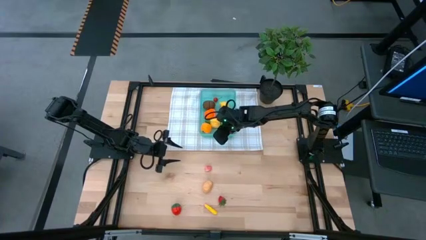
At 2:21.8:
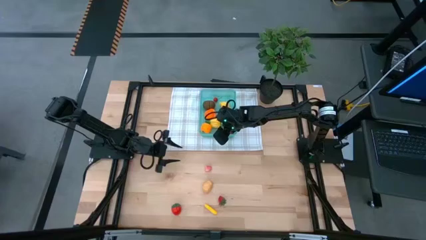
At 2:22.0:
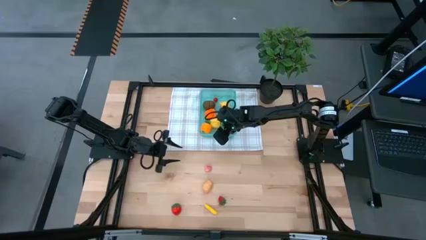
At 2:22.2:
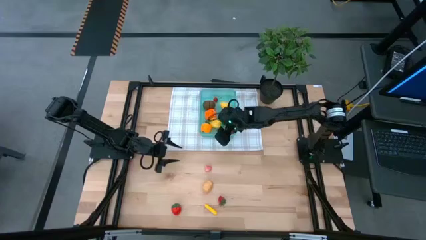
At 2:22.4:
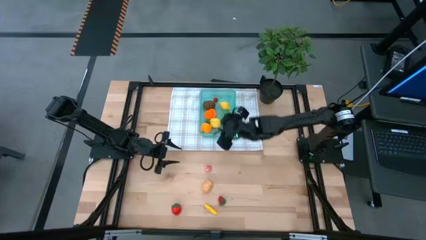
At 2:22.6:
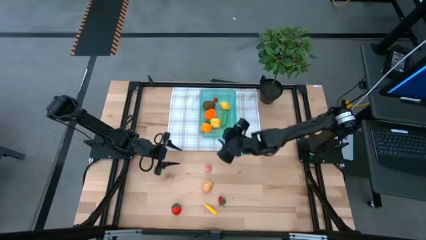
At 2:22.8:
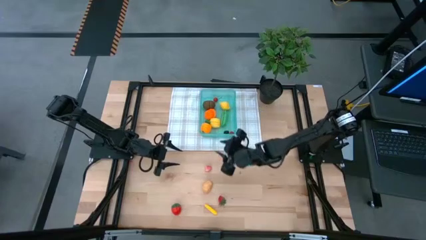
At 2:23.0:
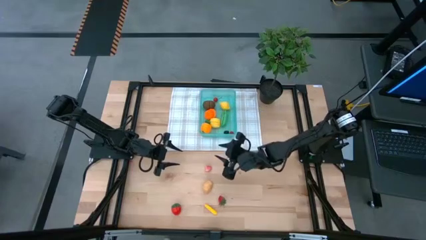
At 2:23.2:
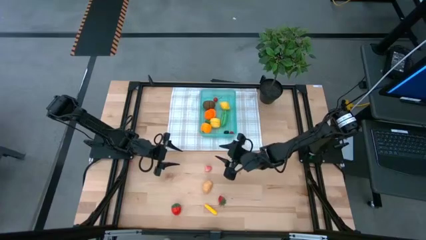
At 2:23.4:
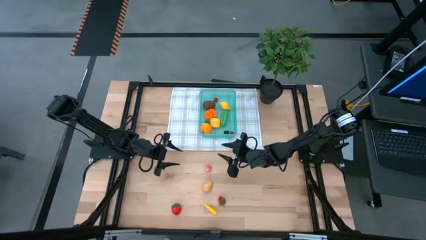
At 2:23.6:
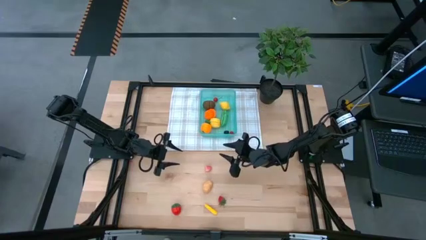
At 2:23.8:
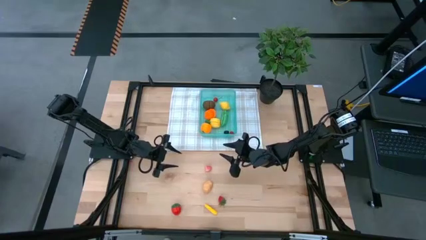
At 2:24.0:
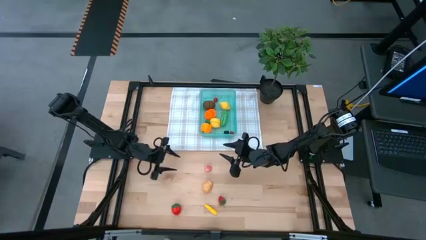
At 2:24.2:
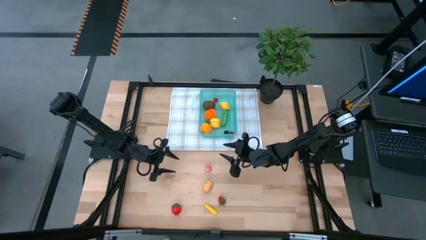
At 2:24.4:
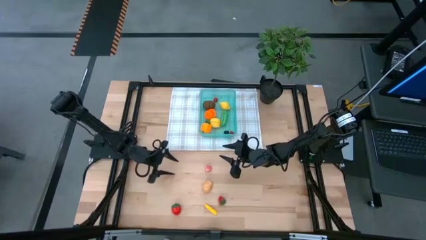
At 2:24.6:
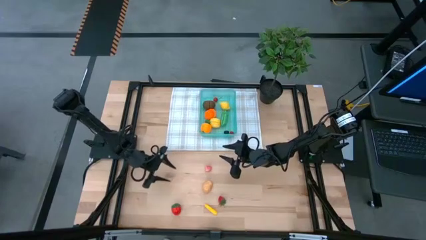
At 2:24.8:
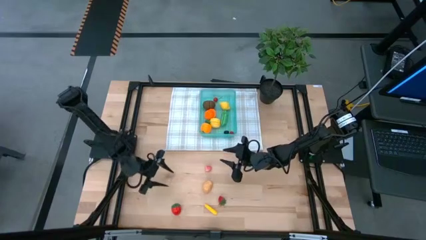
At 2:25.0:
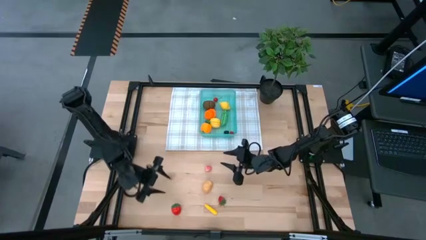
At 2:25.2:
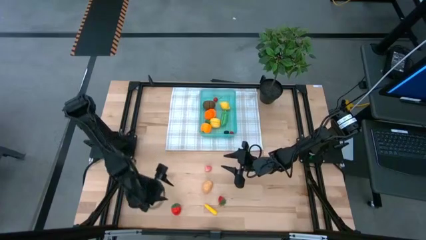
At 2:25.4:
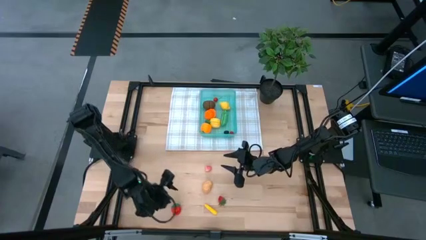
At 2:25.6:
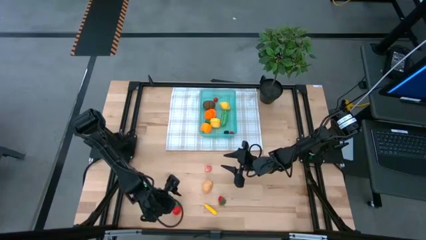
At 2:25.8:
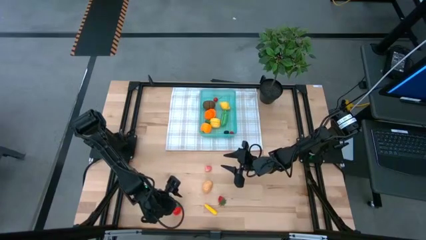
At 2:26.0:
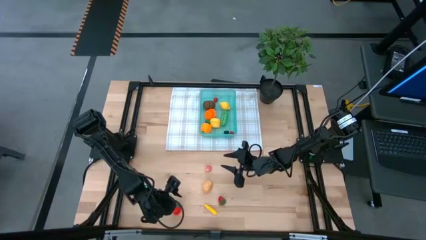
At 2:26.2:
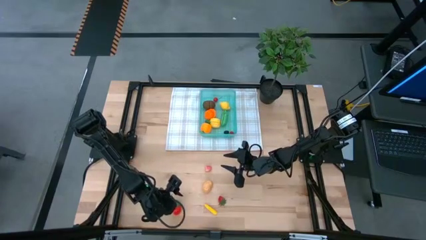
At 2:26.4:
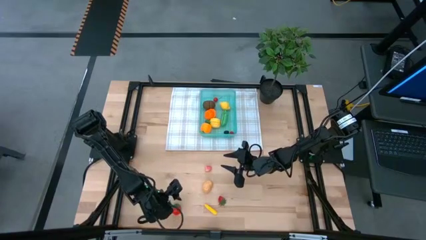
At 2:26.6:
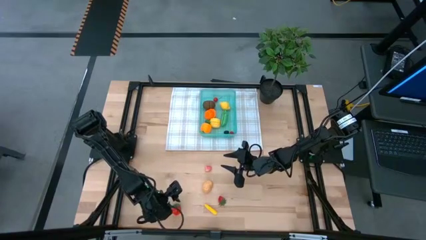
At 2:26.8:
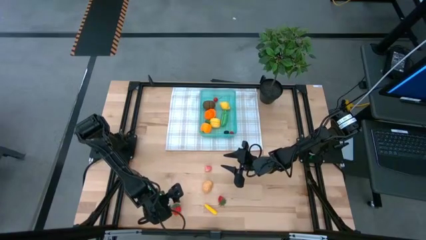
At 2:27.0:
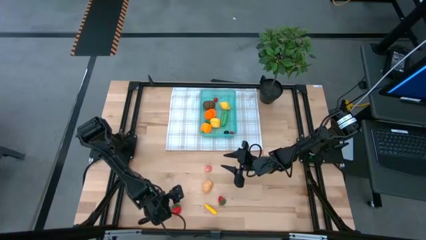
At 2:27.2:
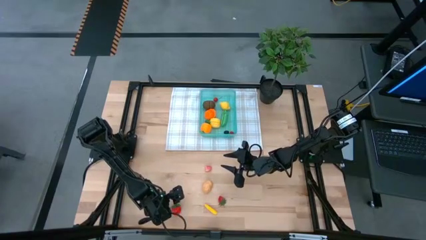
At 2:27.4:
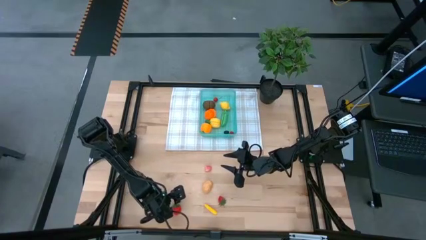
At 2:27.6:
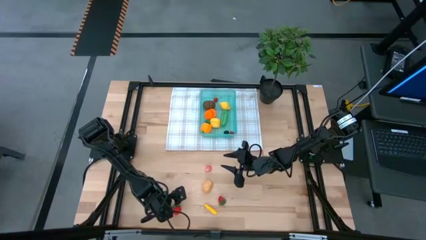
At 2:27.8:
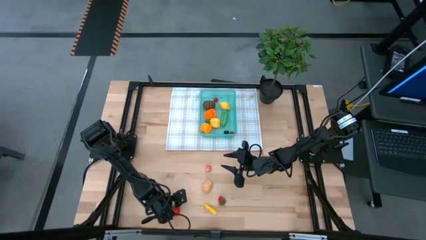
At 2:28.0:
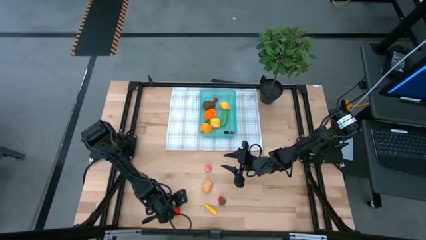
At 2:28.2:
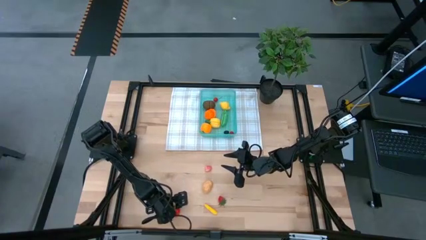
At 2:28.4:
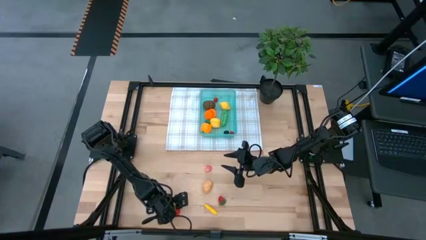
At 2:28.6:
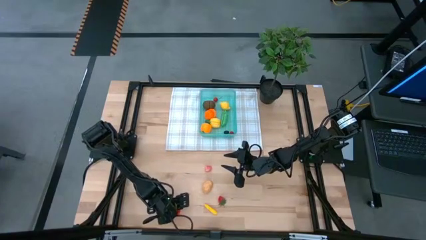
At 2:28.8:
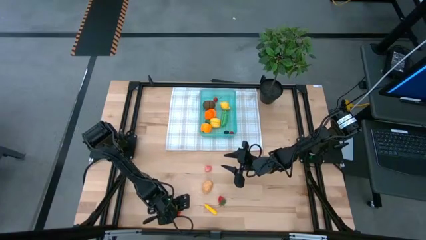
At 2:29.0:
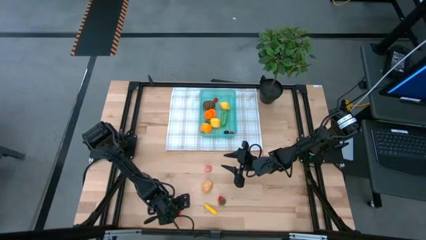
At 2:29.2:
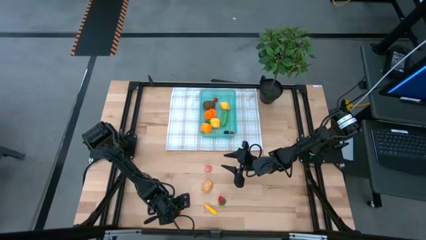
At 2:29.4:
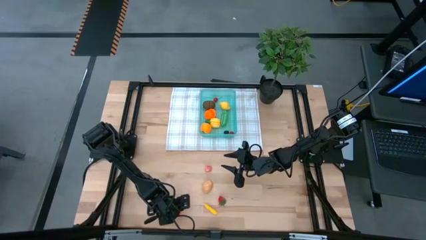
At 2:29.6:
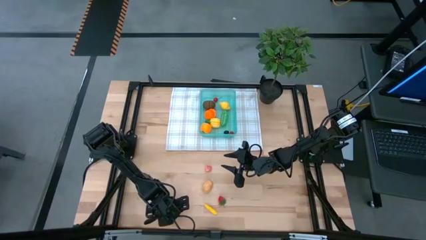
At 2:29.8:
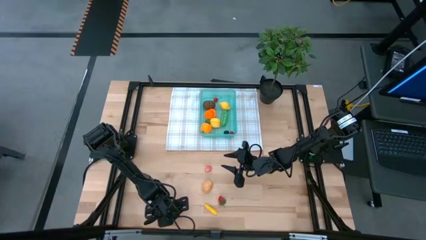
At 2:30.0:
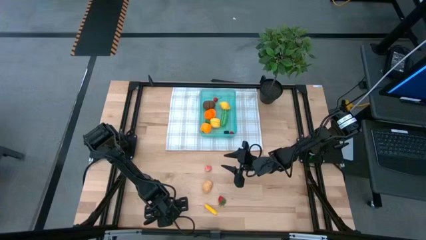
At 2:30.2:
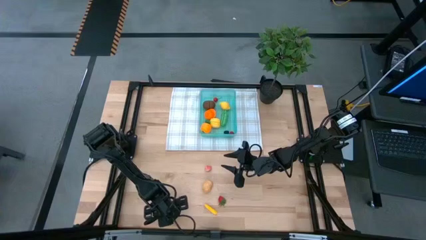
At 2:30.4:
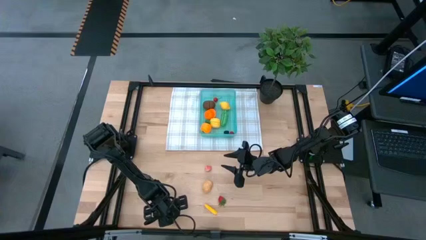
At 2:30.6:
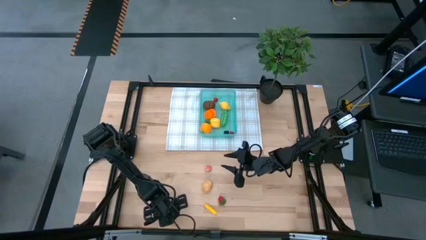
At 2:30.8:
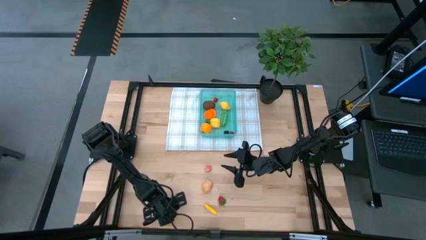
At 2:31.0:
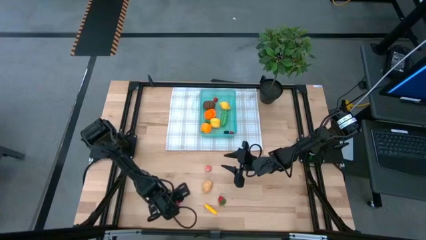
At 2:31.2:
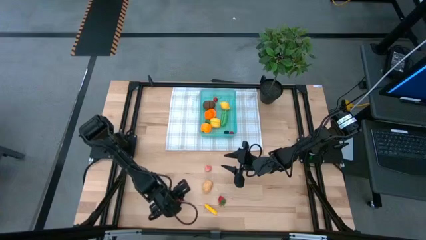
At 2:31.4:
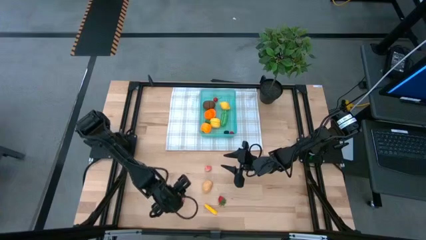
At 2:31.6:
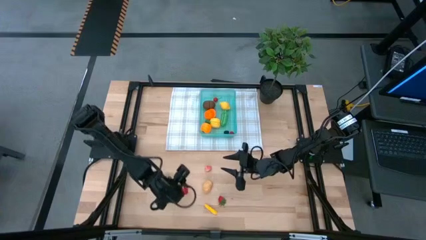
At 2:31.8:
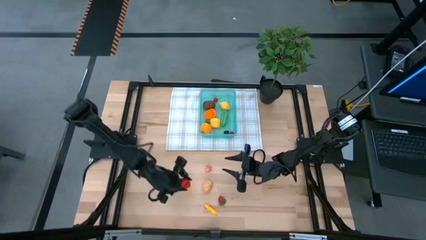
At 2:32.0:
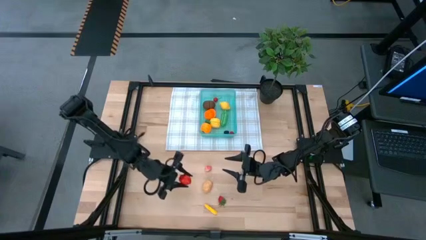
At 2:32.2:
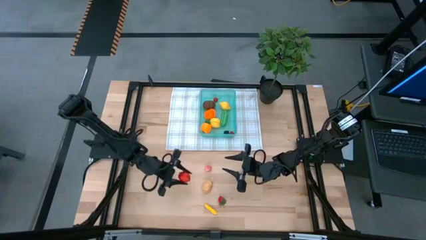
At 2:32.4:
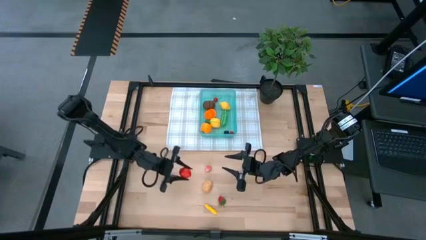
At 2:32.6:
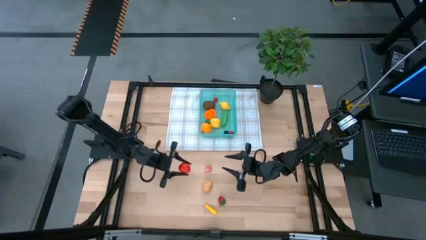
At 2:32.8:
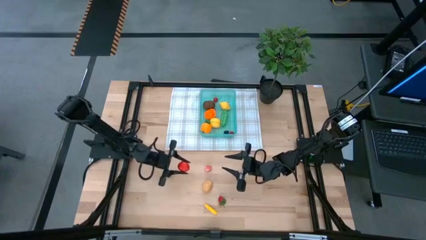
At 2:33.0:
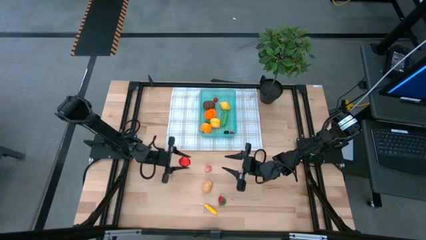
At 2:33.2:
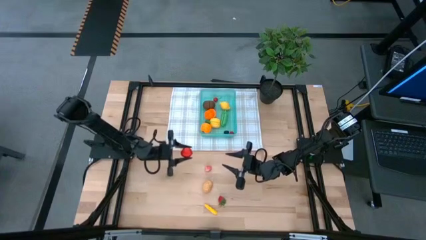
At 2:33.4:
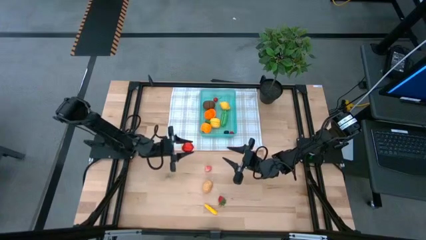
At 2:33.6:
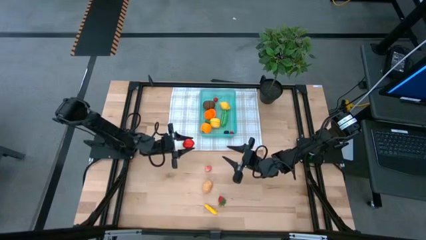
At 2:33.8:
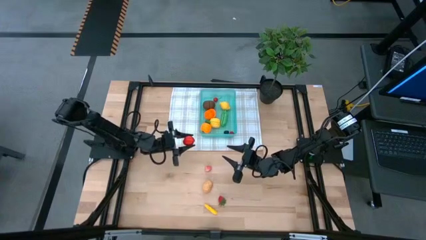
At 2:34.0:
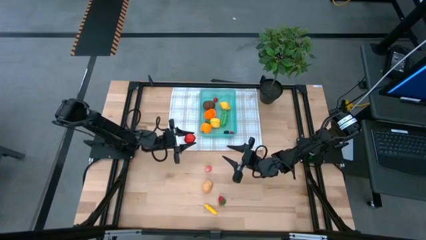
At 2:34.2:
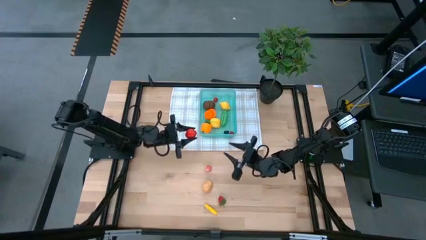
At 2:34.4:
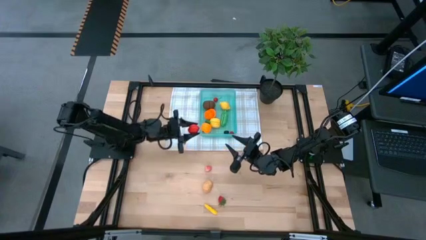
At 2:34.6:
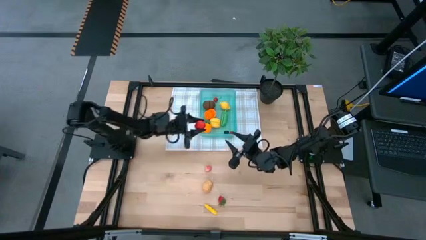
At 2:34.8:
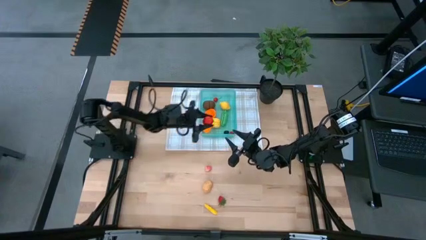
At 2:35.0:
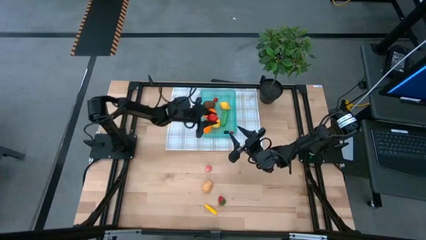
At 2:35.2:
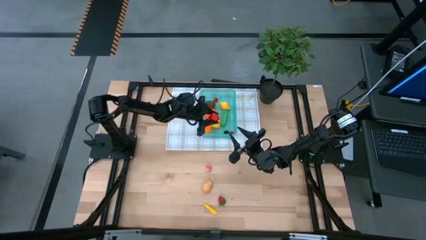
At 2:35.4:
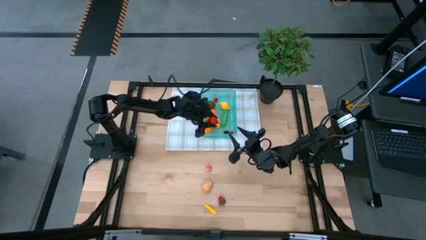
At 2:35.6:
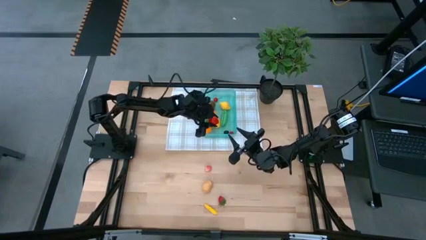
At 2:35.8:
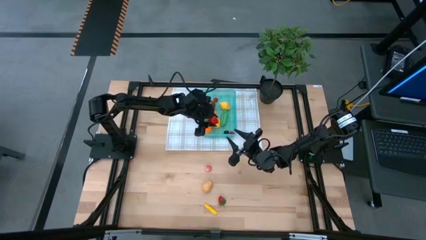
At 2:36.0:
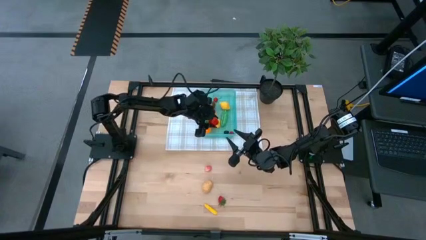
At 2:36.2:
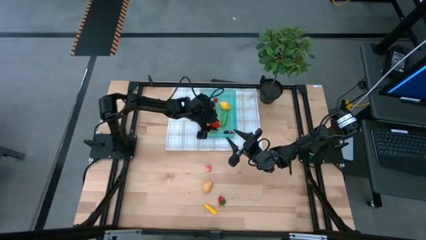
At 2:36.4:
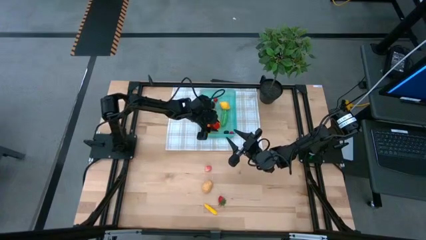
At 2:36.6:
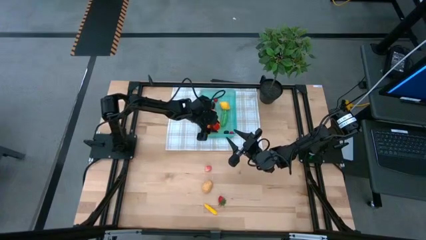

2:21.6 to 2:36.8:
Task: Pick and placing Produce into tupperware
Put the left red strawberry into the green bin
